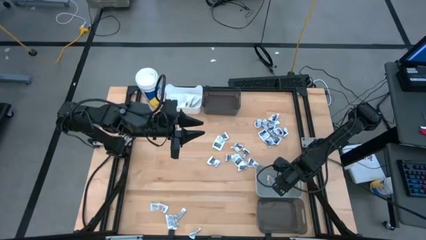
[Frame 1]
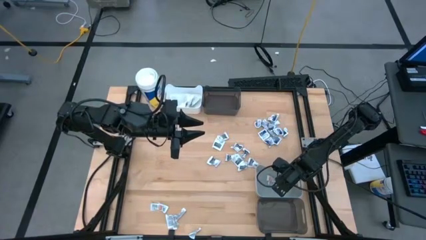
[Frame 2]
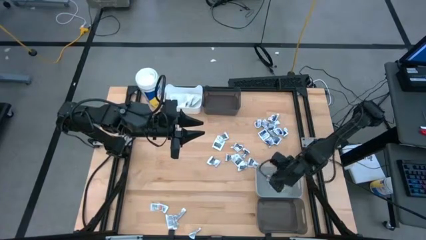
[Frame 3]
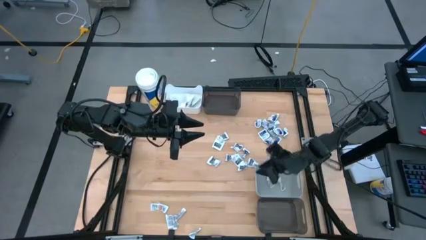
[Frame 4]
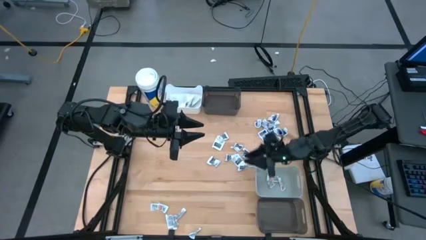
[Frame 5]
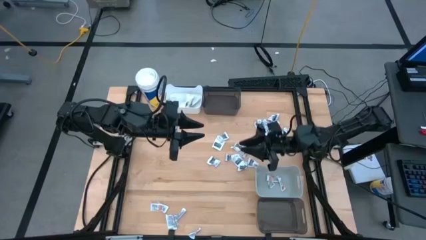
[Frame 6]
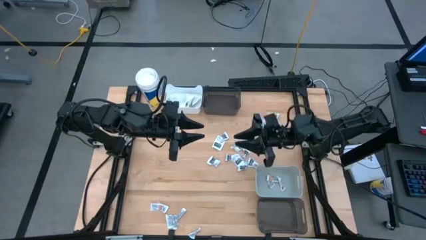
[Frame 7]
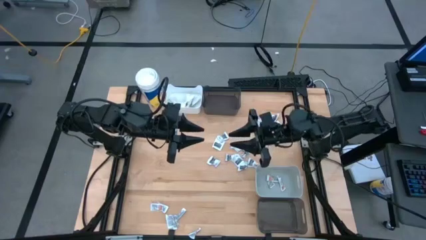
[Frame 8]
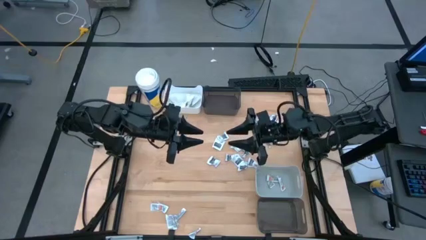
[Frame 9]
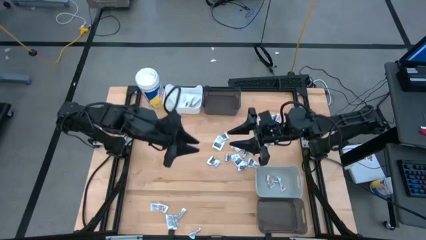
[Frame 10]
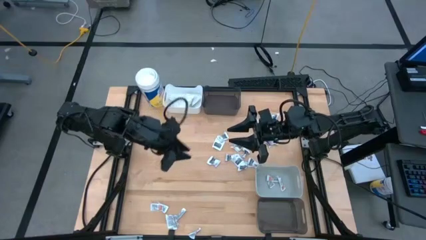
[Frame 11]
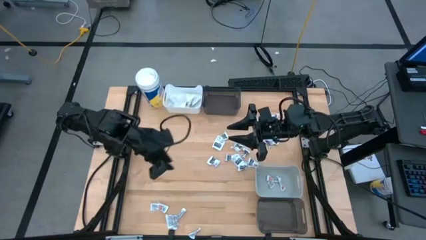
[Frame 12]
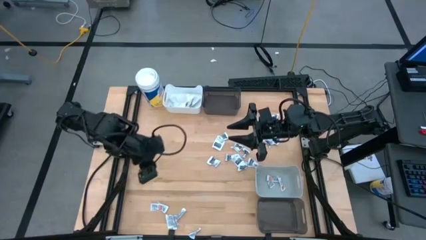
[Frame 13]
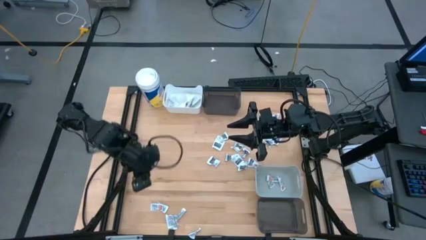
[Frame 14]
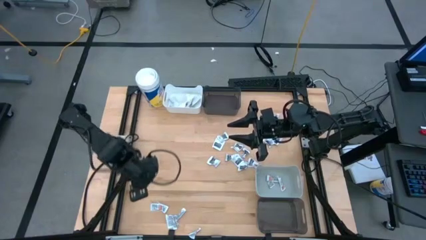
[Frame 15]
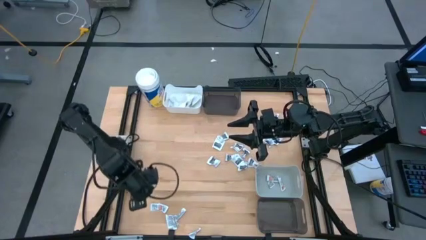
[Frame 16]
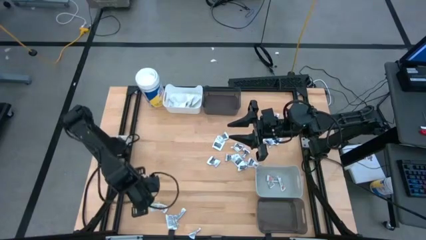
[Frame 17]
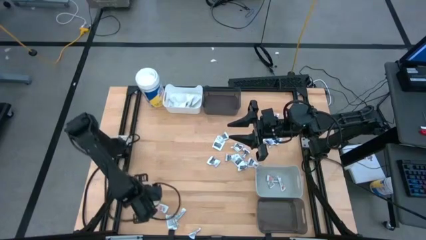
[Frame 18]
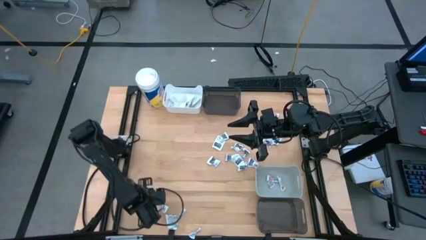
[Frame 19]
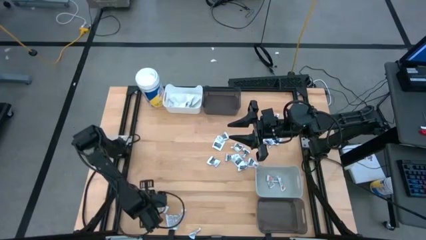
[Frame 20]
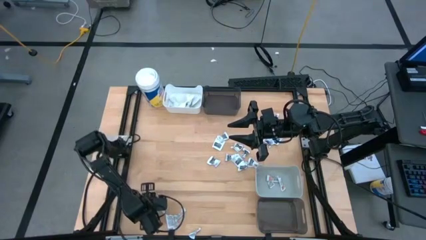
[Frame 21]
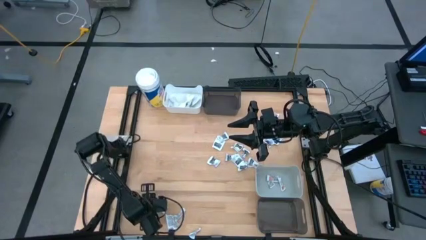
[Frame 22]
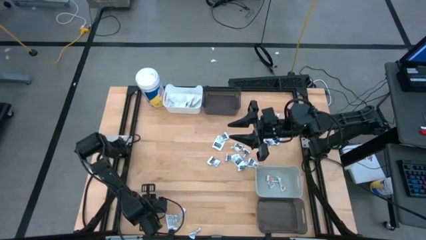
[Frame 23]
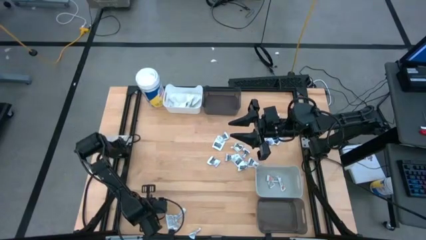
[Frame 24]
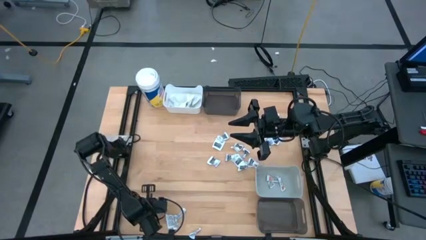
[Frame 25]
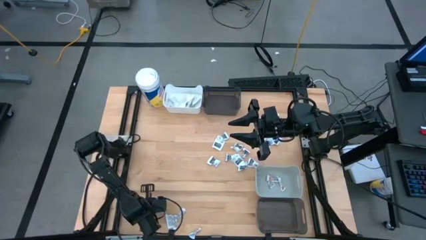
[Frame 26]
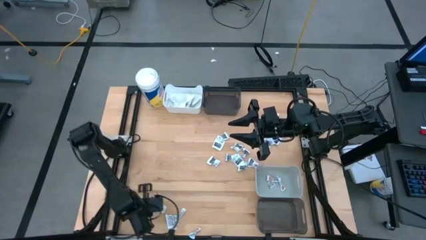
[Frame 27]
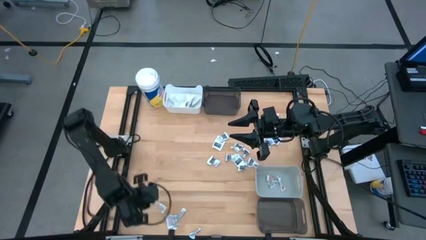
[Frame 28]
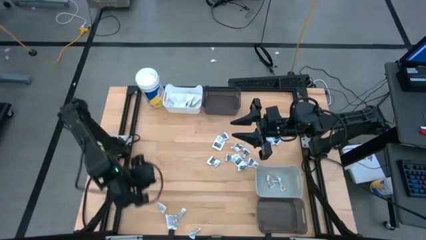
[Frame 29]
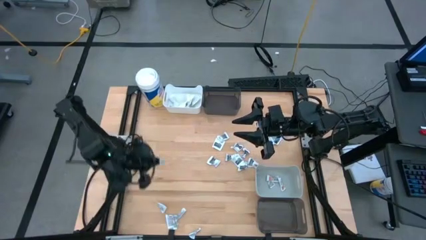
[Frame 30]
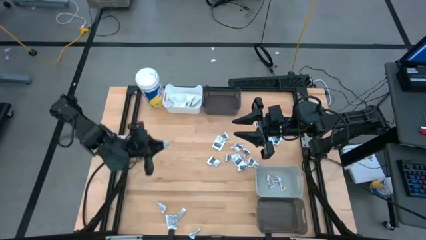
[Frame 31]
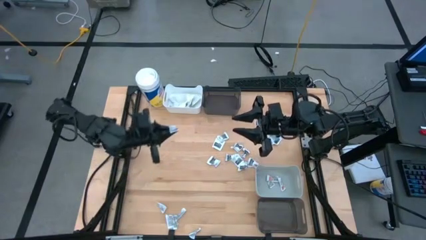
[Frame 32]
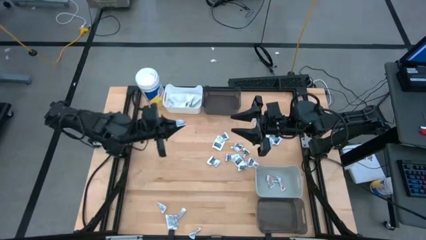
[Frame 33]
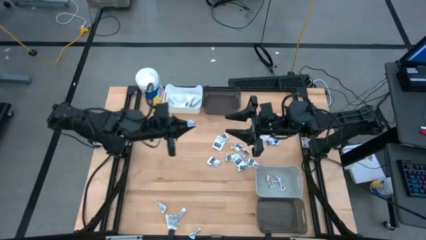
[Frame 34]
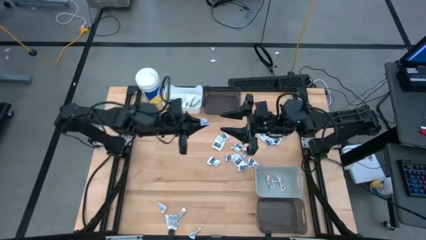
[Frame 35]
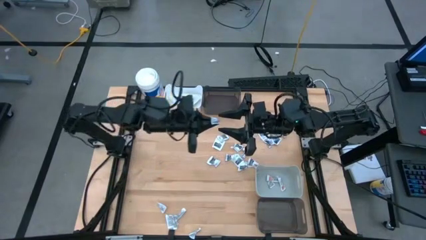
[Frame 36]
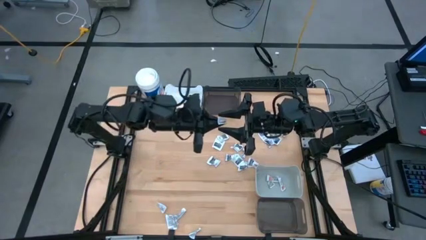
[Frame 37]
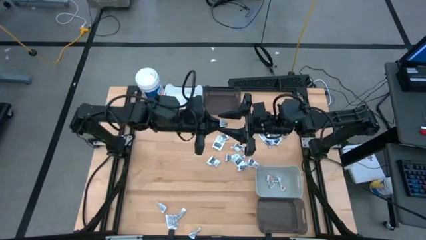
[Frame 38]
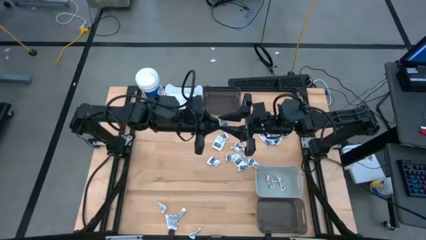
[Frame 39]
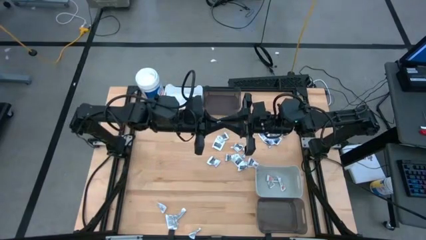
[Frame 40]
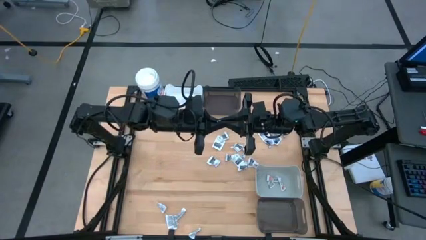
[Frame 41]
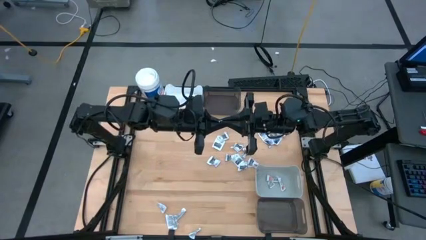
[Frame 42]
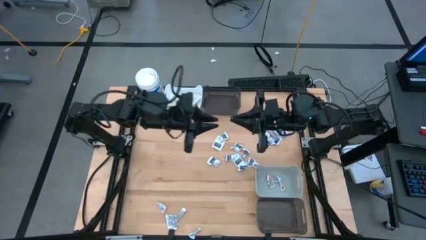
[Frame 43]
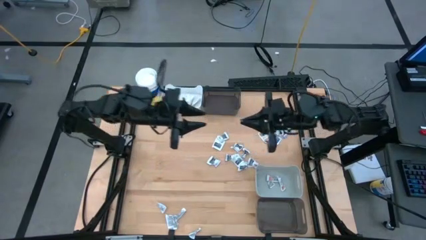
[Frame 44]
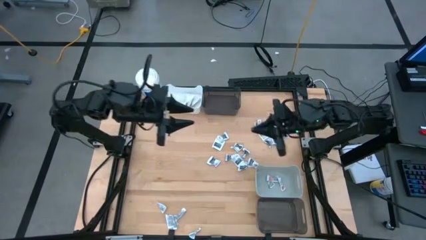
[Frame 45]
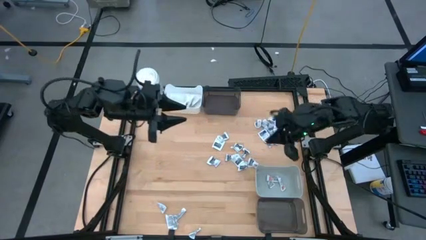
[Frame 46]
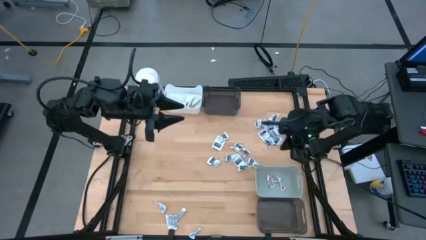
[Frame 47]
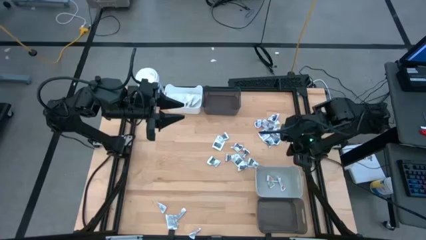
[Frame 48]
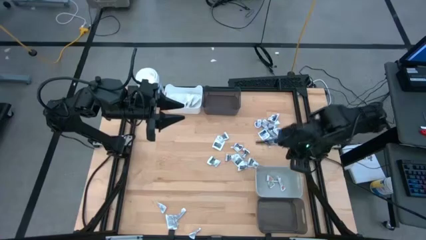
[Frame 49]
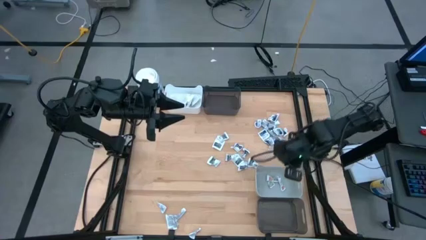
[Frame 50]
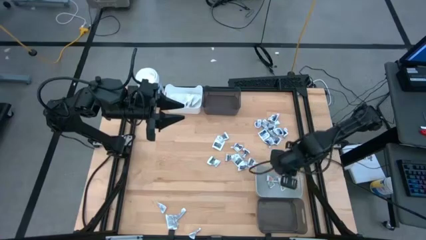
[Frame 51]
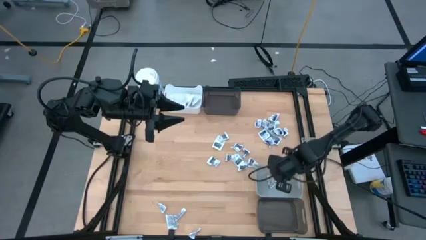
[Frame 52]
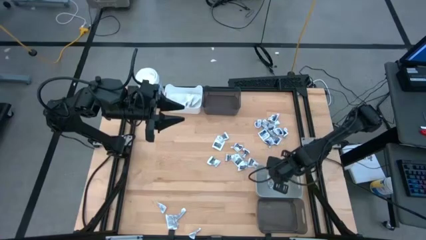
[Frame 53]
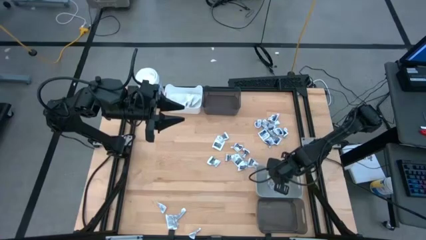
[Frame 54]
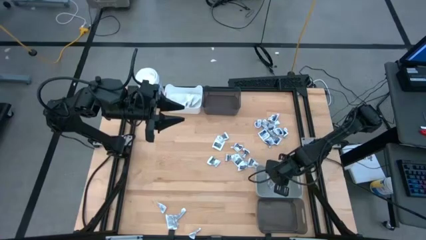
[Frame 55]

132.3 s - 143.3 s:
Task: Pick & Place First Aid Supplies
Put the orange ointment pack into the gray bin

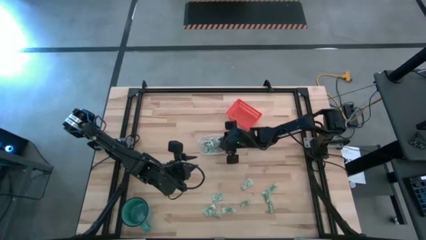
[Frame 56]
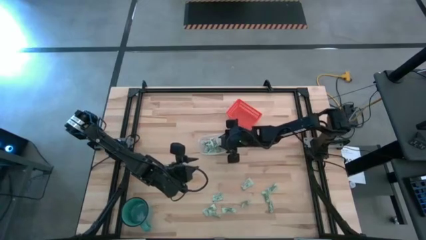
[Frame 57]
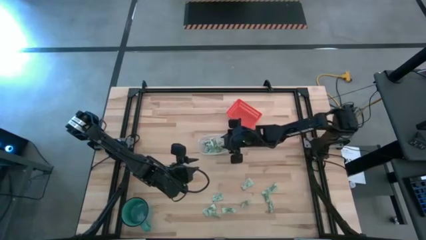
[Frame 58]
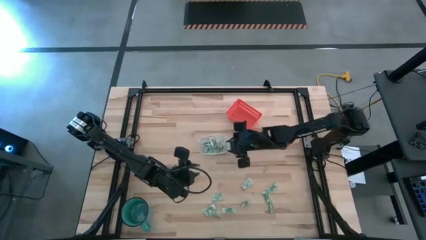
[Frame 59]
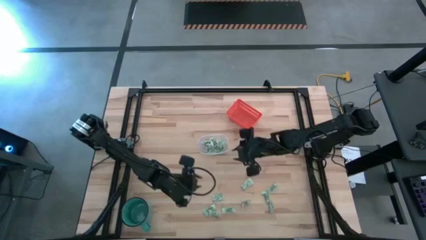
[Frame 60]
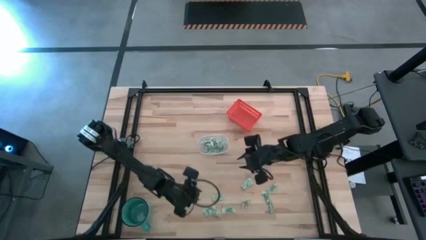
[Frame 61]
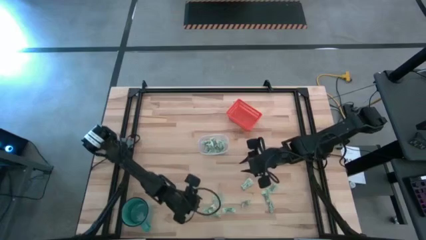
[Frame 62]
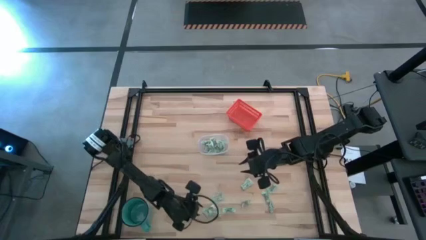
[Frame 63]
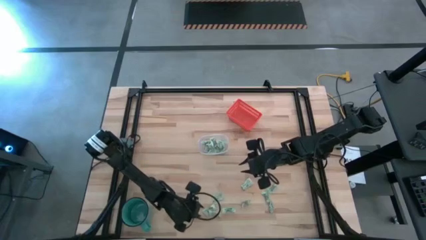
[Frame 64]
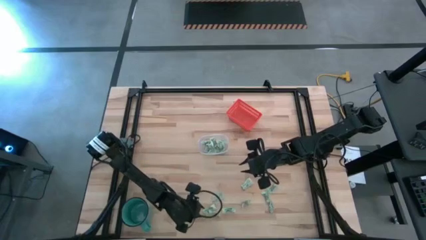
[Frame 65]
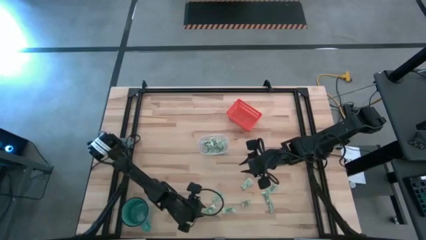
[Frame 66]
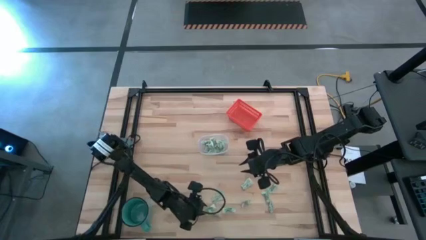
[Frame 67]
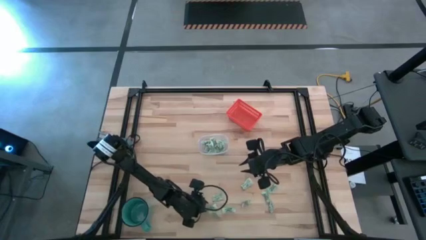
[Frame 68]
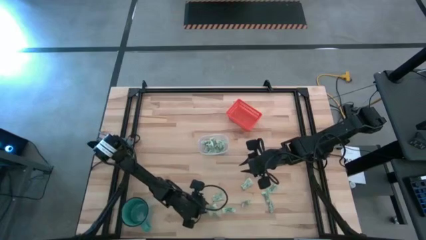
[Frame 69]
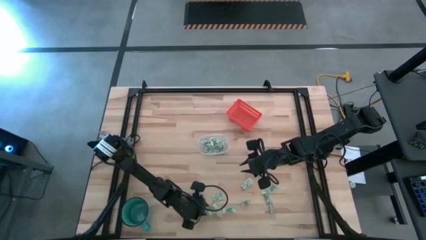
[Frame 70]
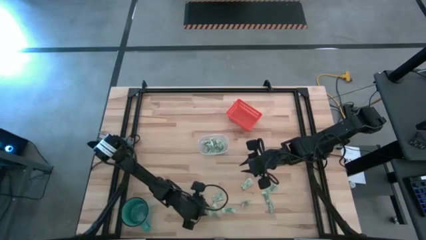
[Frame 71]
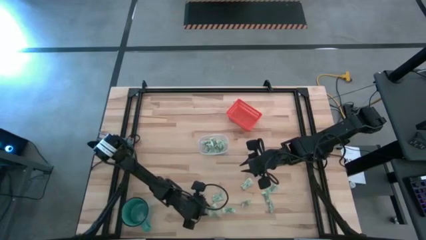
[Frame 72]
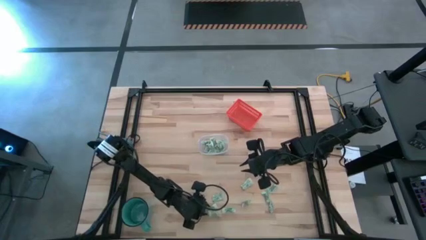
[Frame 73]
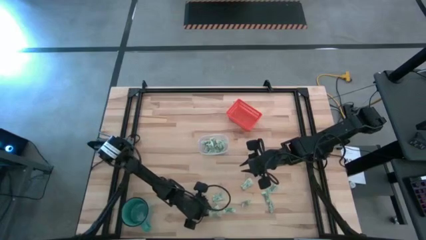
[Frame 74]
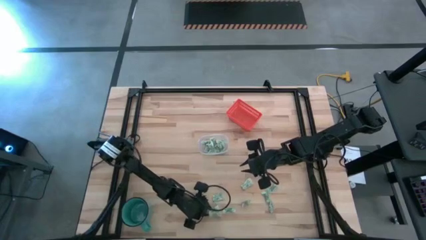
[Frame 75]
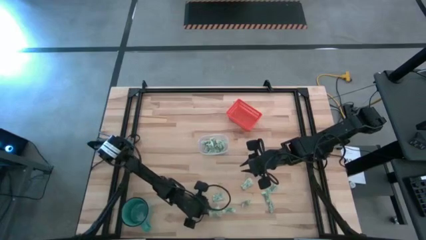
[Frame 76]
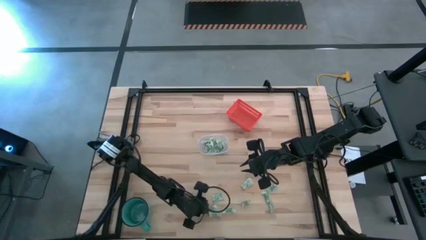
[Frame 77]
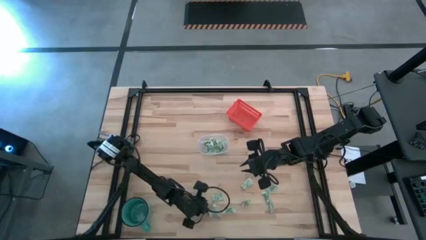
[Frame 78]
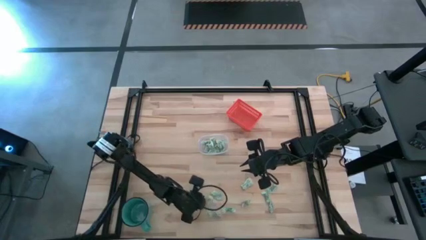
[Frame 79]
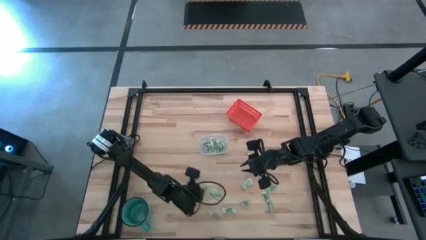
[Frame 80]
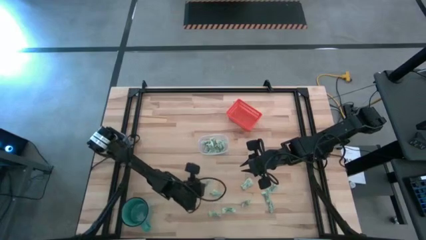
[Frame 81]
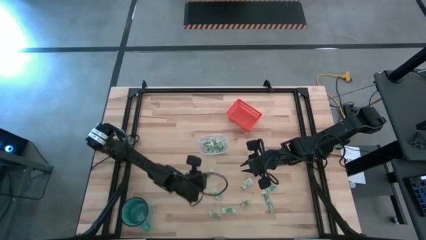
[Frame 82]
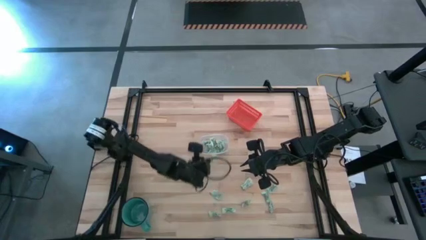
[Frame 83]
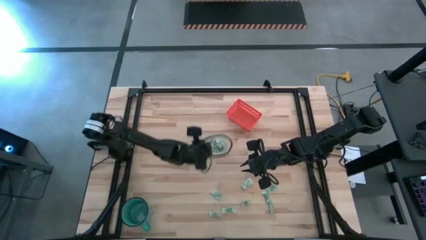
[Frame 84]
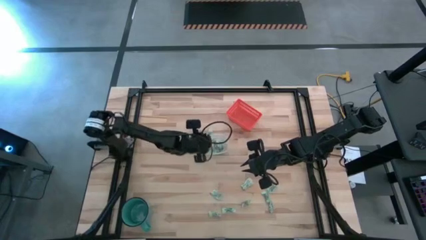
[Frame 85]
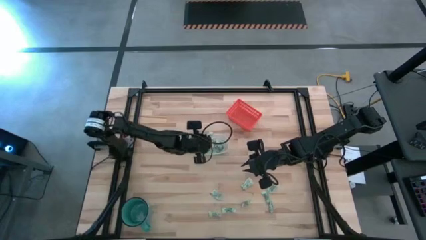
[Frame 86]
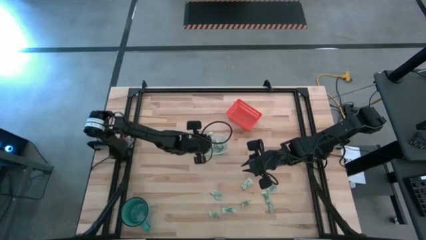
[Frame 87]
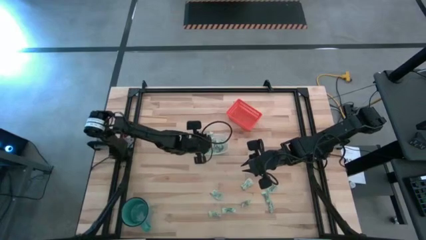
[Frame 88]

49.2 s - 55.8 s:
Task: Pick and place items into bin
Put the stevia packet into the transparent bin
